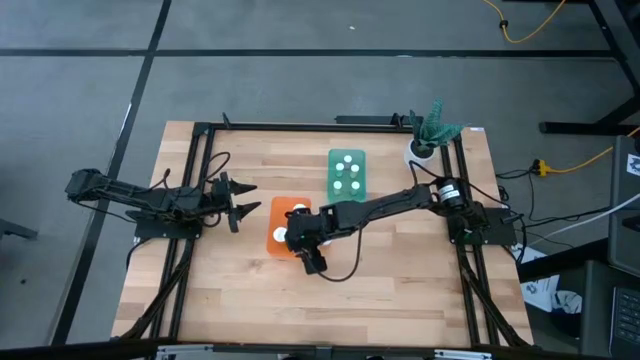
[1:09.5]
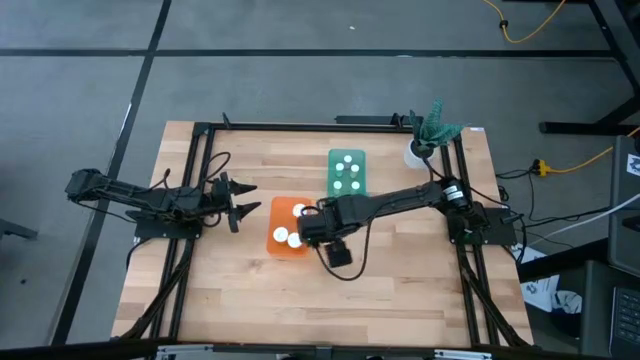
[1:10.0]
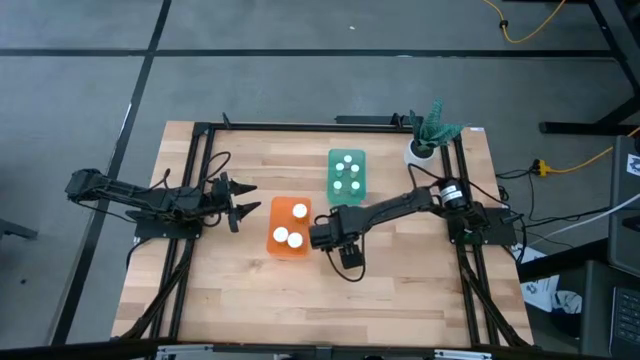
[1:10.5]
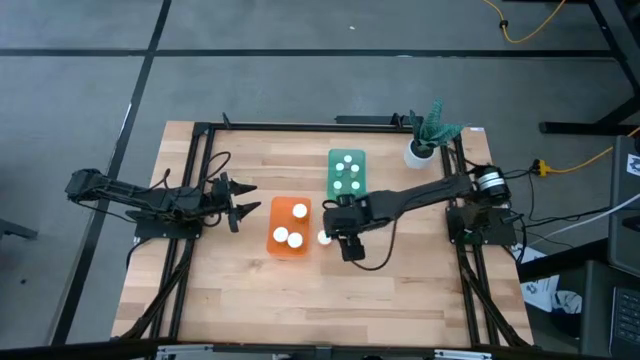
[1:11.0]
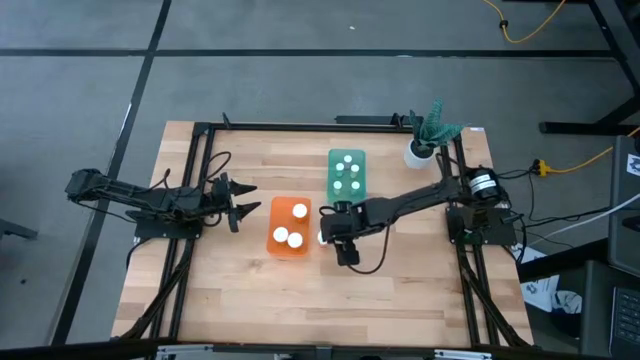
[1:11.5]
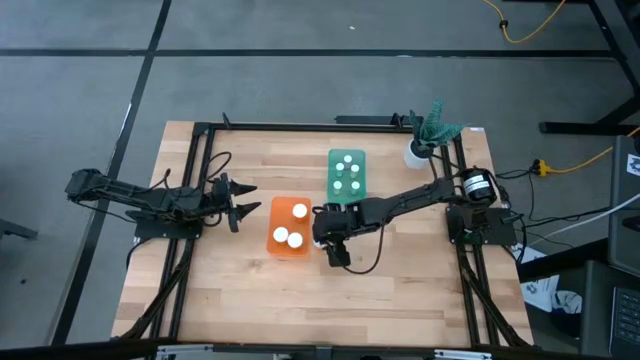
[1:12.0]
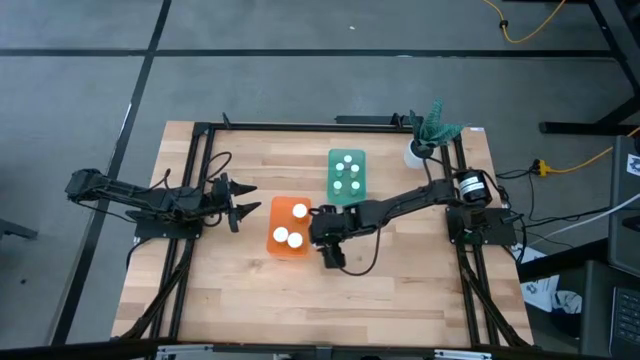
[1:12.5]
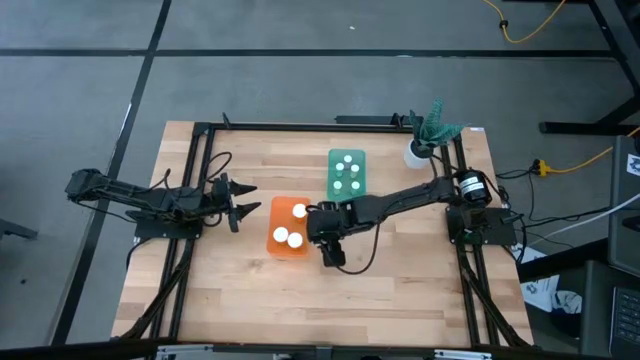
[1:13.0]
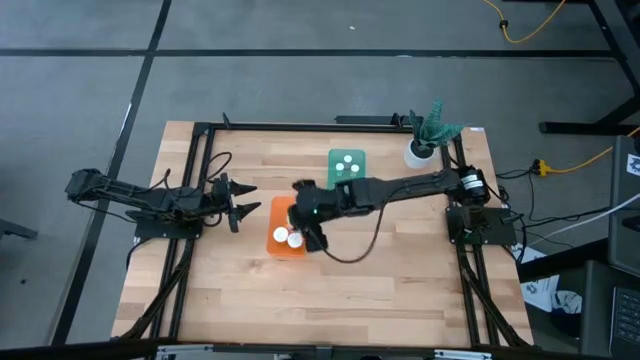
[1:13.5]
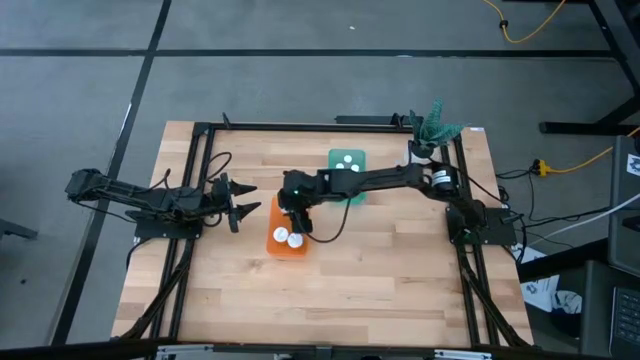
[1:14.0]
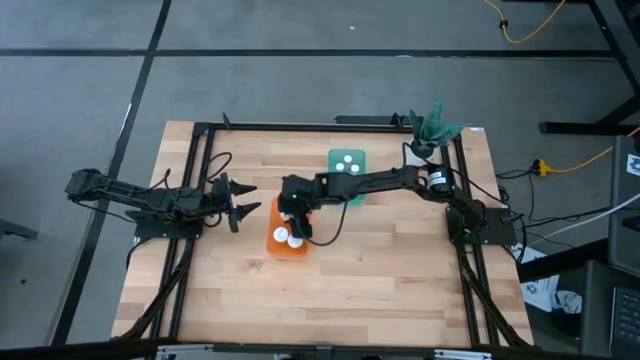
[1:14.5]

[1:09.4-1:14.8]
Task: Pick and place medicine bottles into bin by pill shape (circle, oval)
Put the large medicine bottle into the orange bin

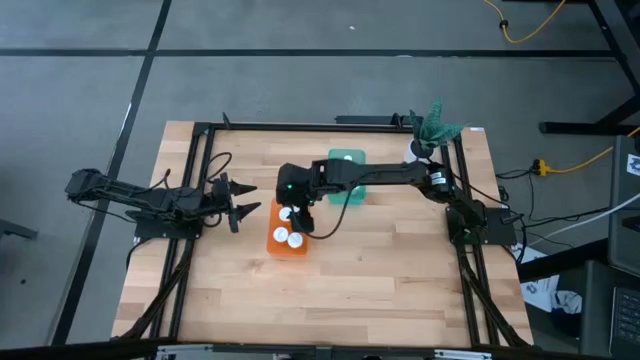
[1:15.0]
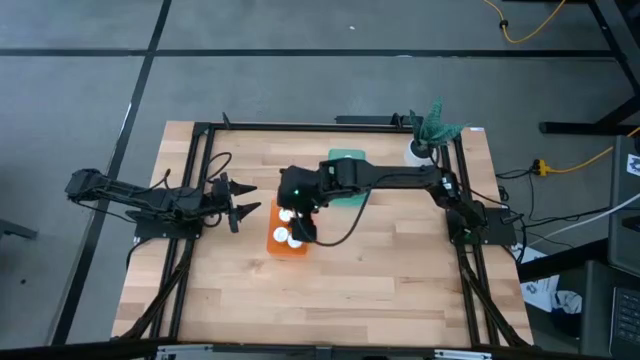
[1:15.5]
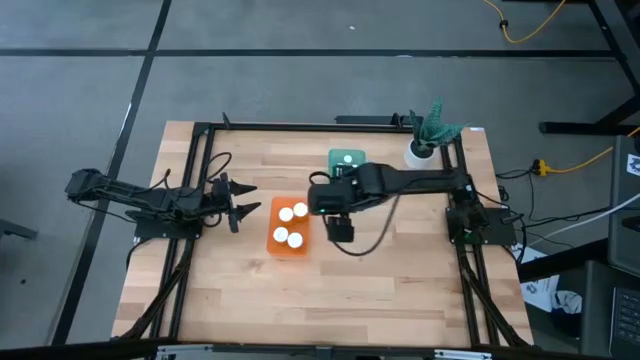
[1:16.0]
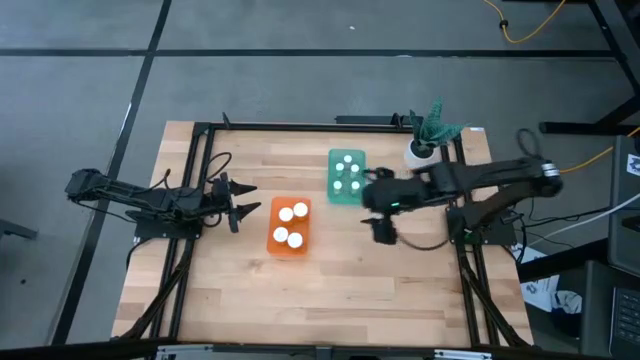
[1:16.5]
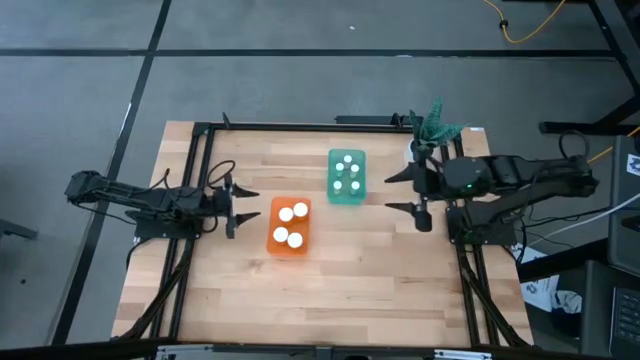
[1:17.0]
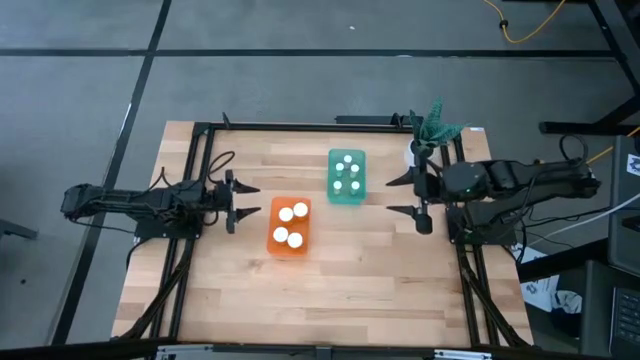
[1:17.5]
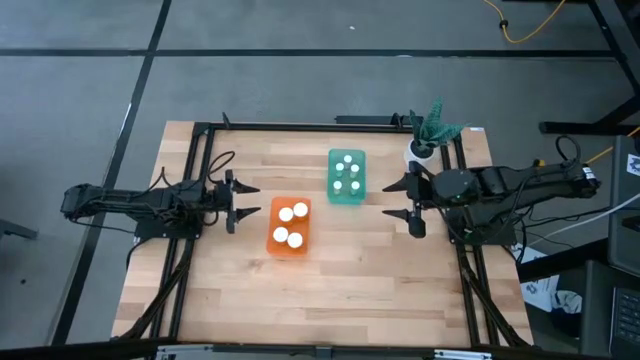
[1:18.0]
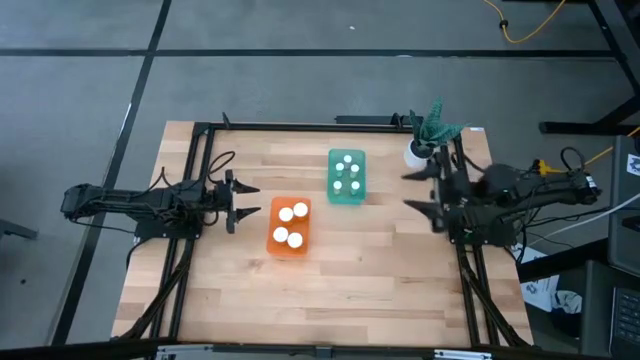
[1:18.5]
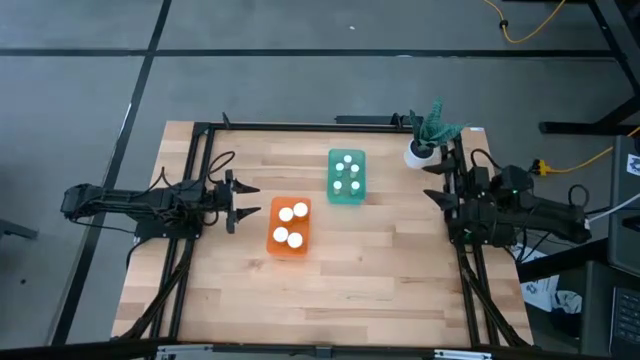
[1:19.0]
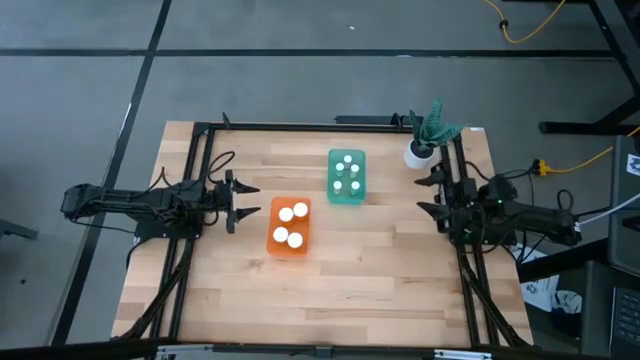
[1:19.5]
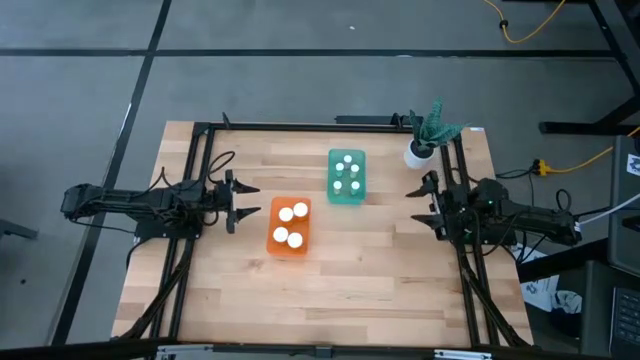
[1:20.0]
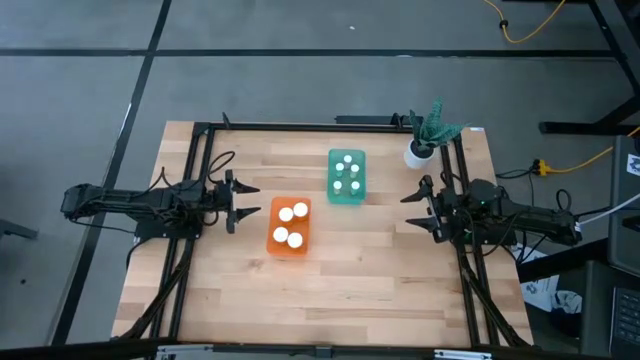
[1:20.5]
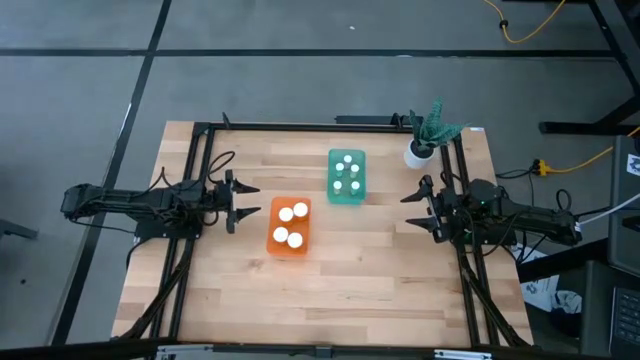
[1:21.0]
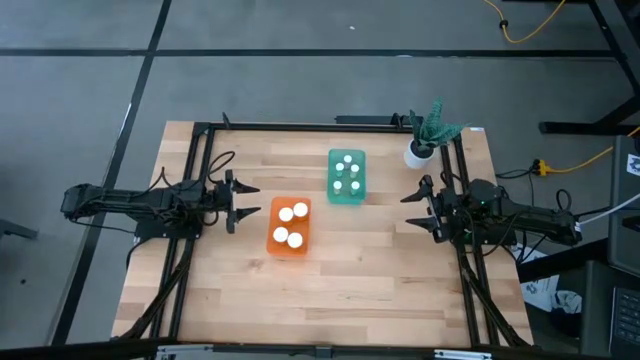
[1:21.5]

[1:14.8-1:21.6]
Return To Home Position

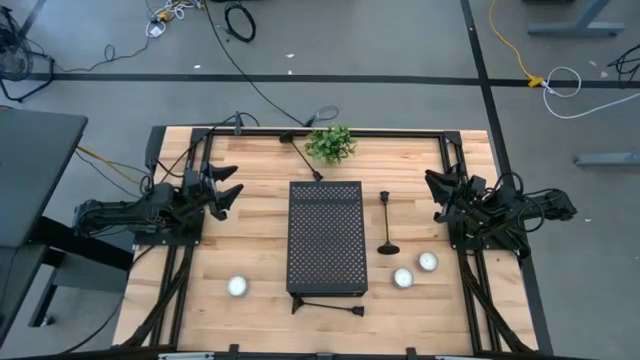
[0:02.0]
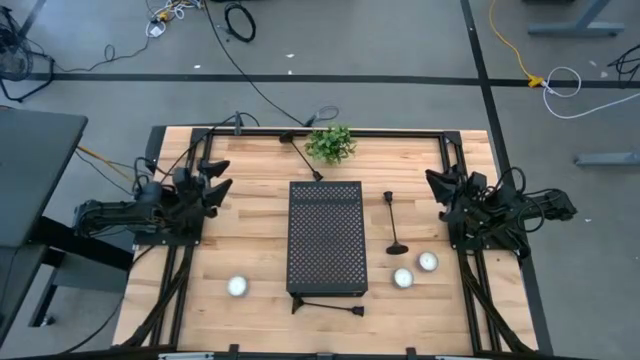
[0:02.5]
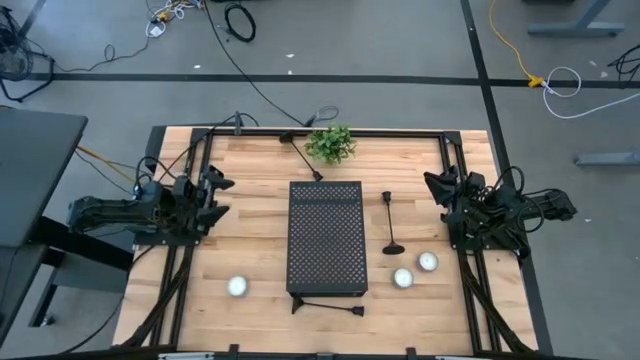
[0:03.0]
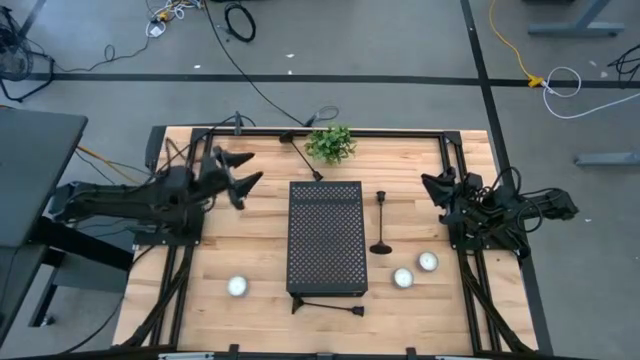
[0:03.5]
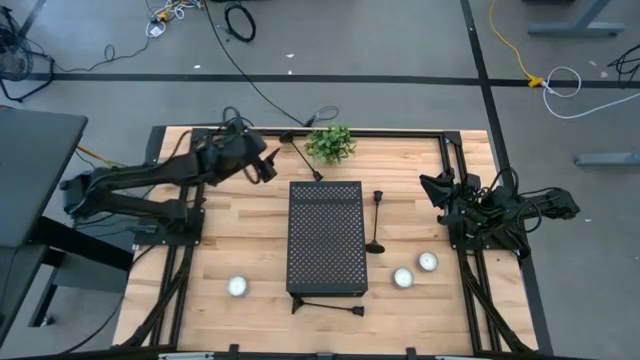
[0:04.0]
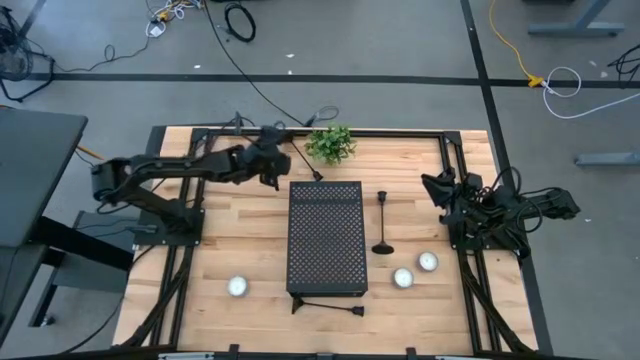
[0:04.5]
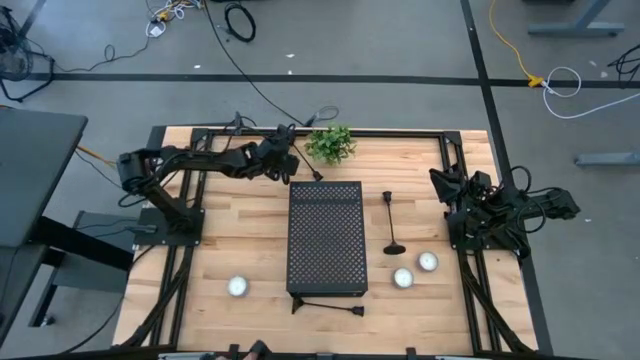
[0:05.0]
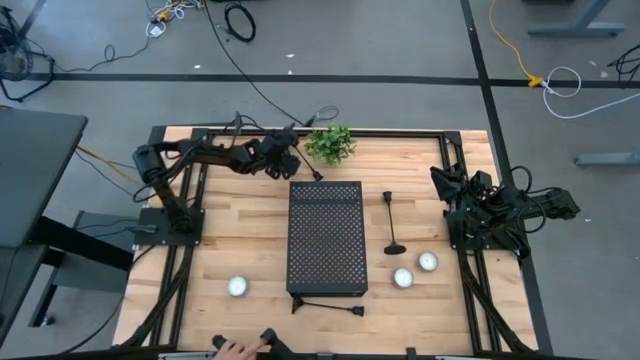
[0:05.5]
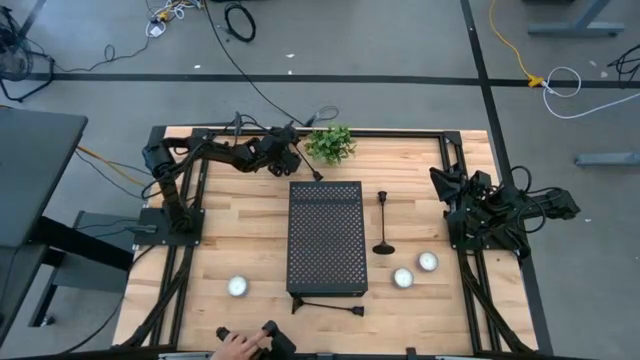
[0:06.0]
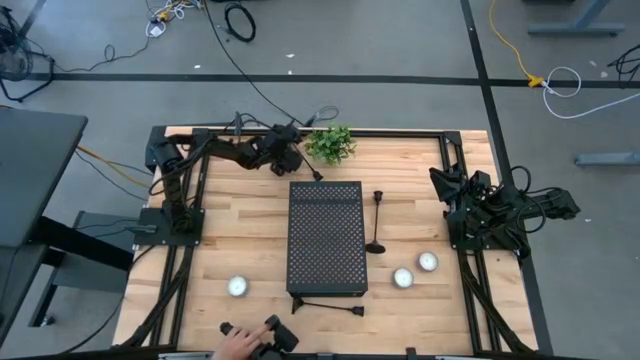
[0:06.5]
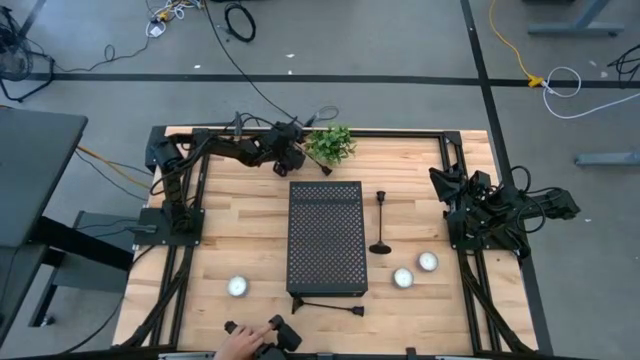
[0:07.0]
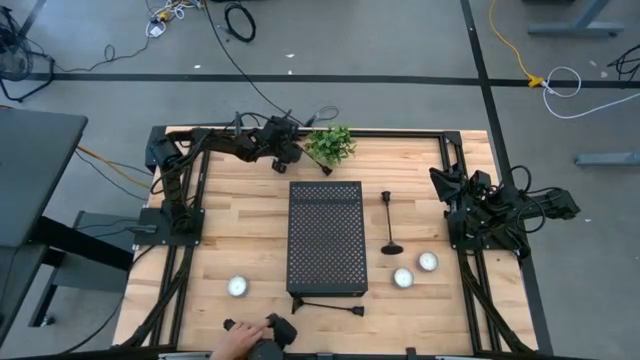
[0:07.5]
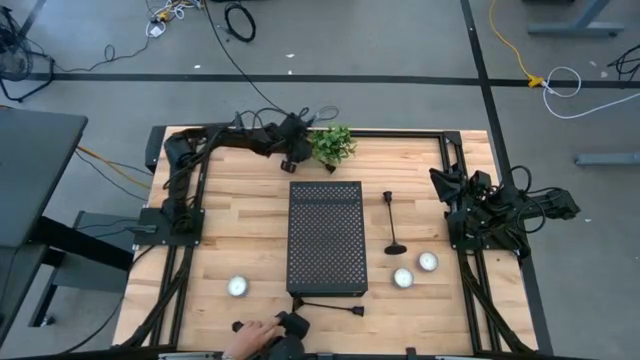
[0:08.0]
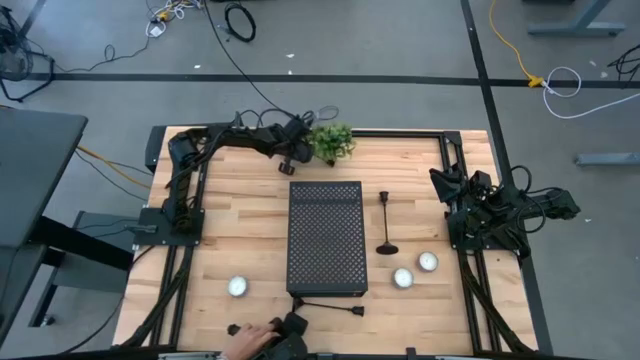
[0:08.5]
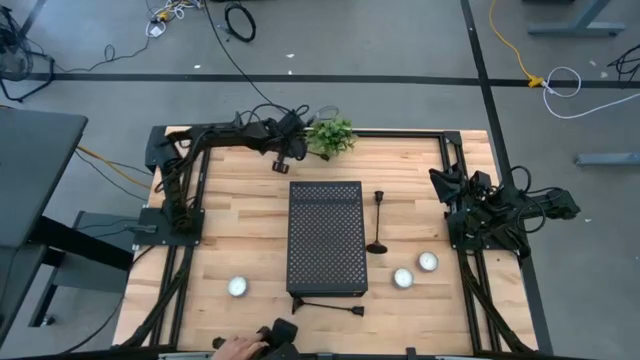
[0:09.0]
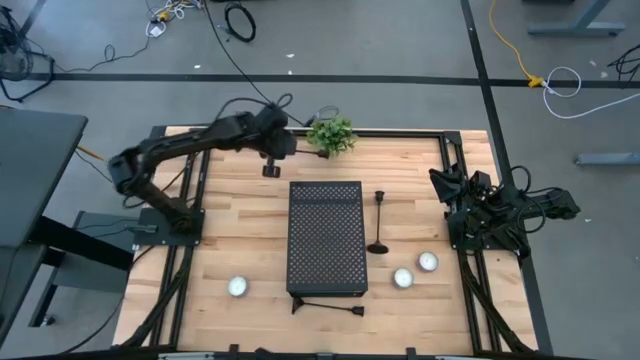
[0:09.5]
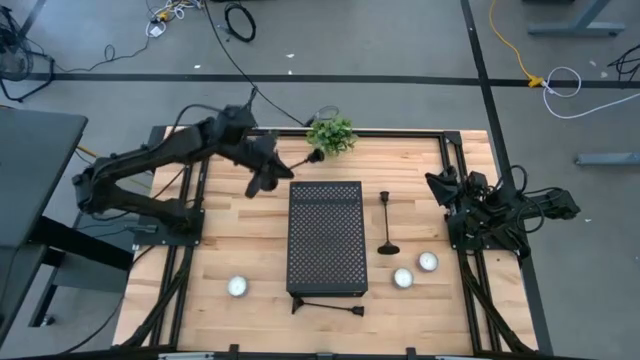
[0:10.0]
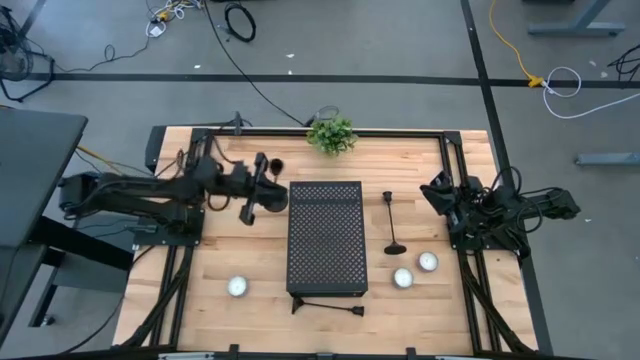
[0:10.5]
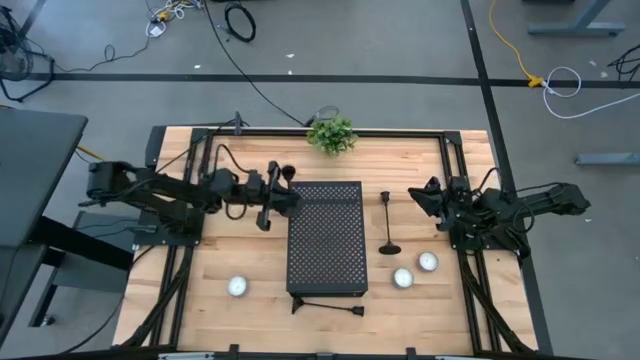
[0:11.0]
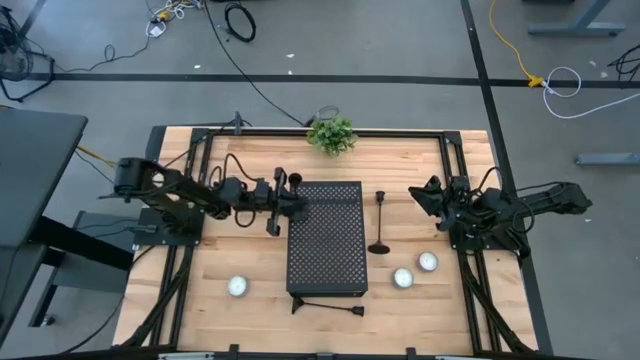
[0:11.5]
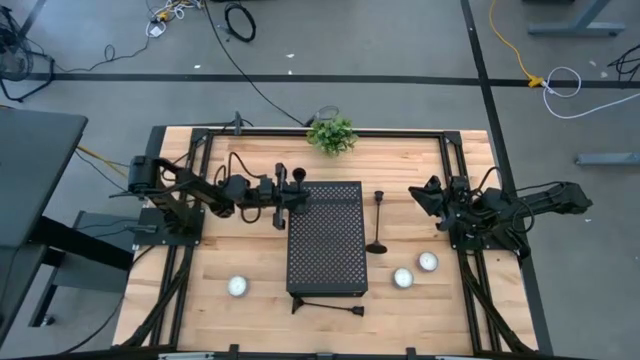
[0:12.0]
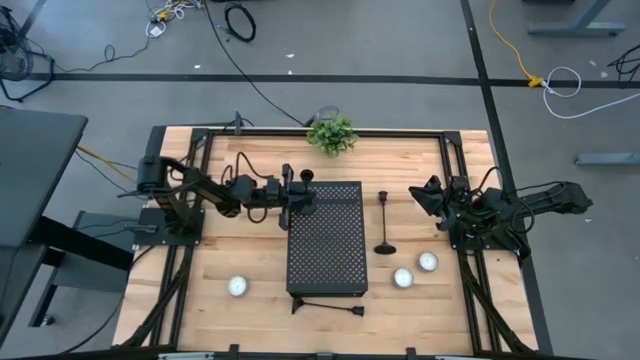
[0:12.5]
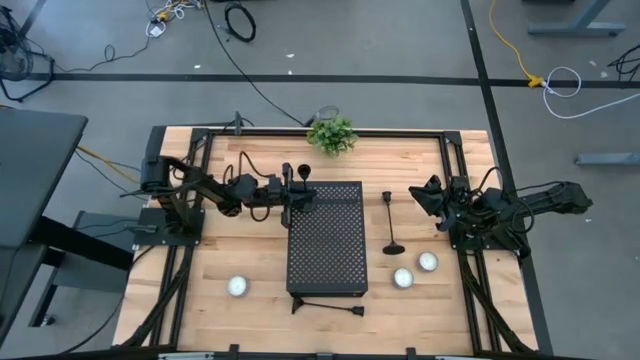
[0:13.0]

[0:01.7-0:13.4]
Task: Pick & Place candle stick holders
Put the top black candle holder on the shelf
